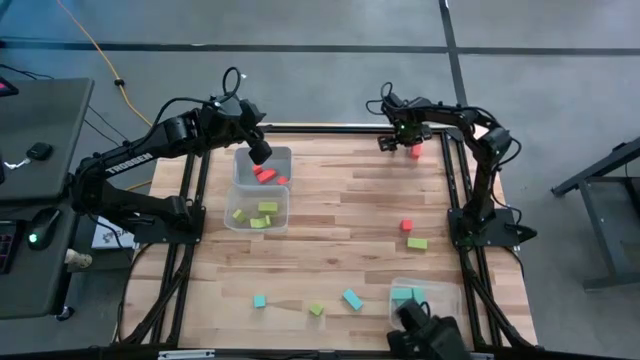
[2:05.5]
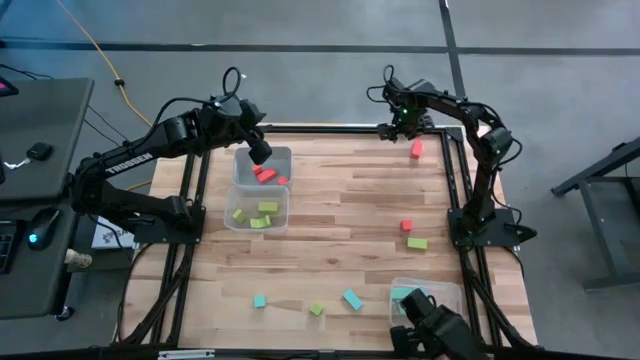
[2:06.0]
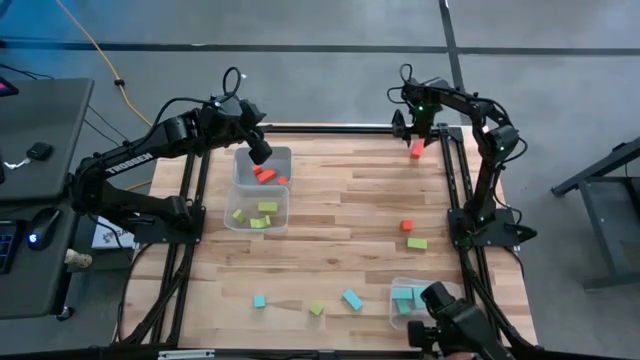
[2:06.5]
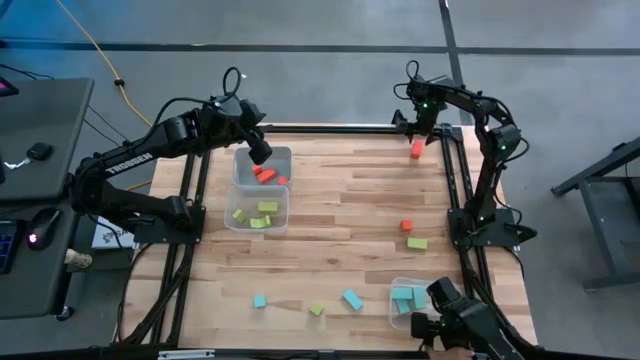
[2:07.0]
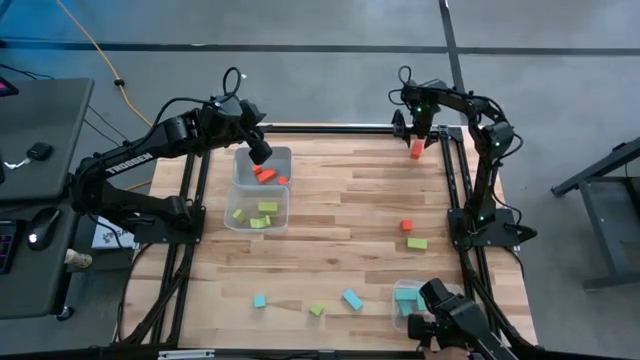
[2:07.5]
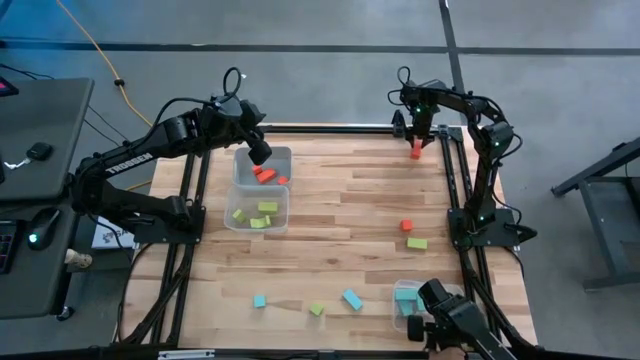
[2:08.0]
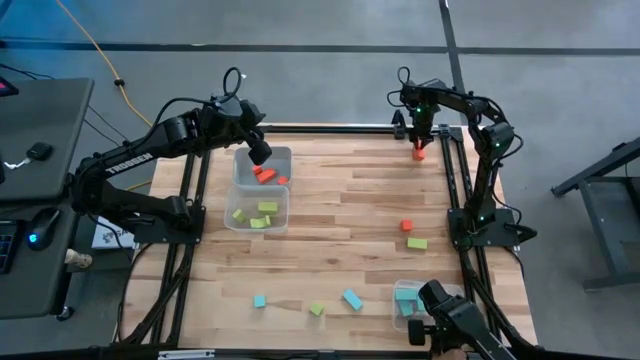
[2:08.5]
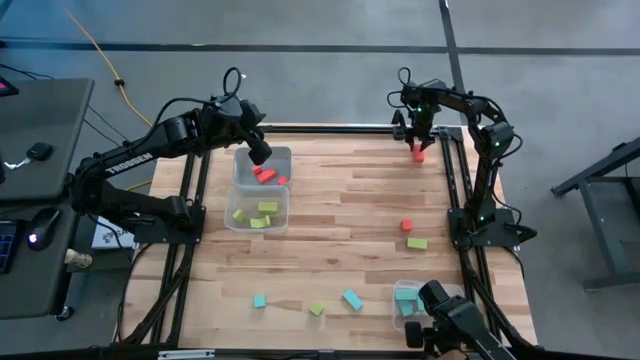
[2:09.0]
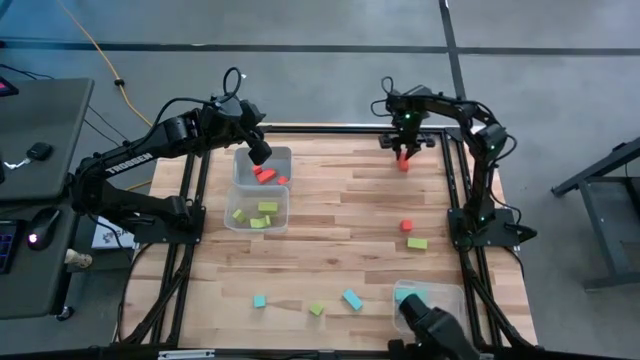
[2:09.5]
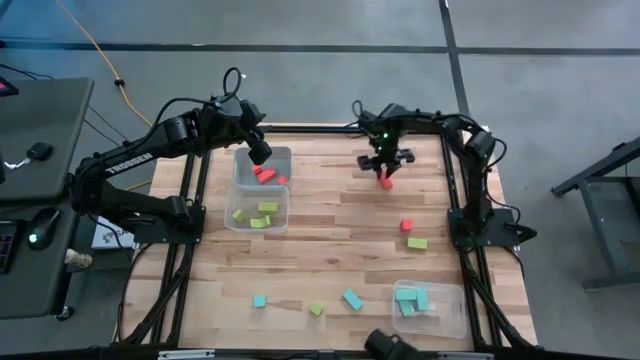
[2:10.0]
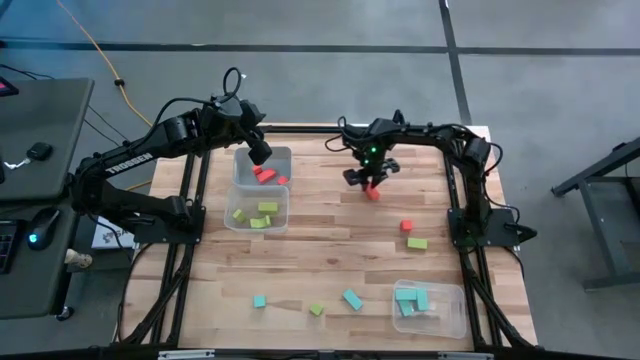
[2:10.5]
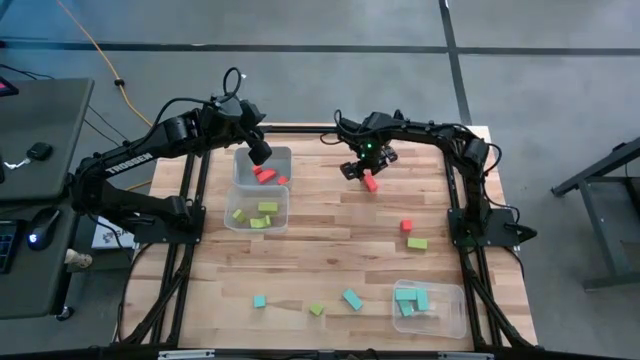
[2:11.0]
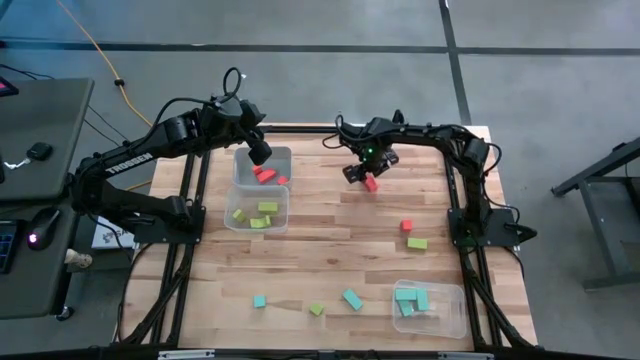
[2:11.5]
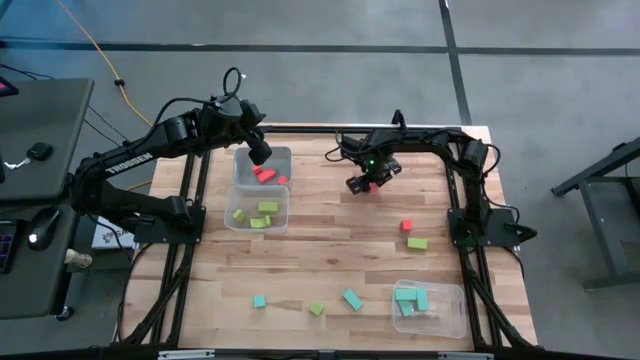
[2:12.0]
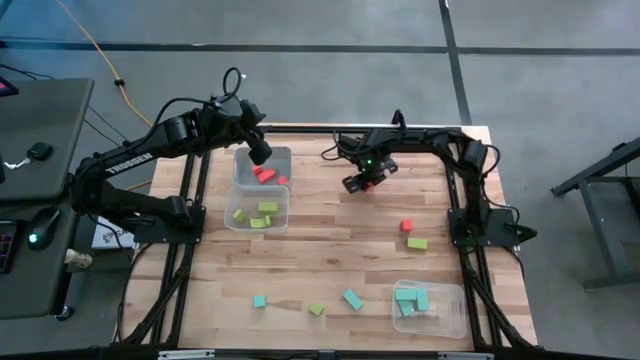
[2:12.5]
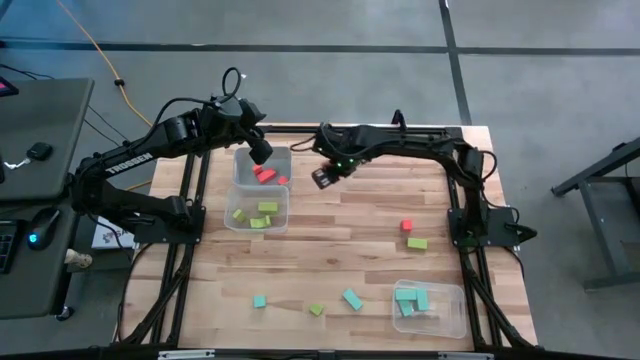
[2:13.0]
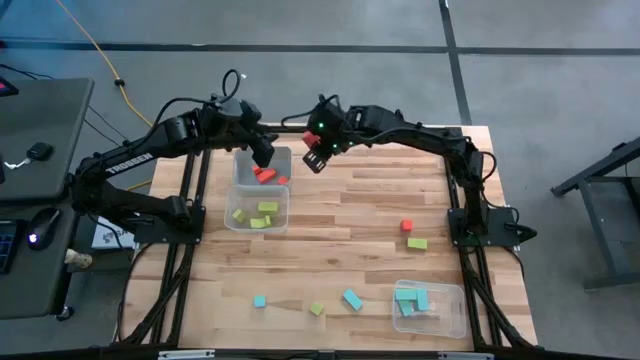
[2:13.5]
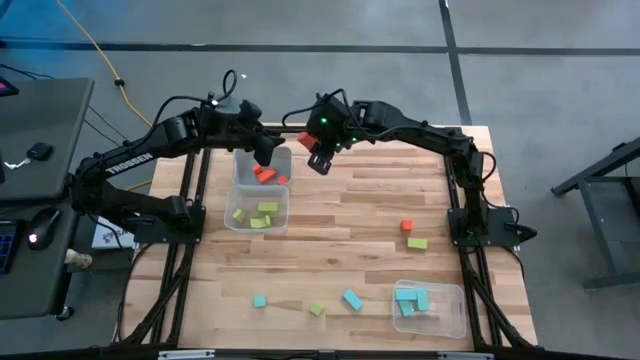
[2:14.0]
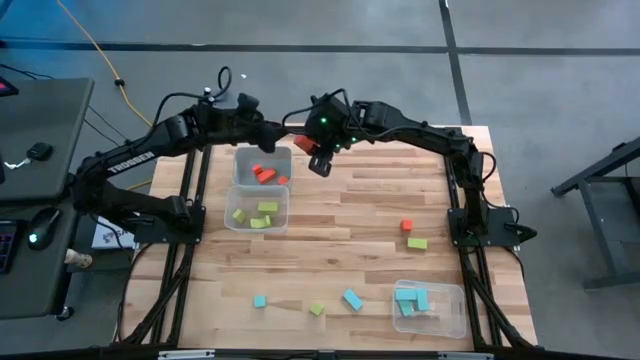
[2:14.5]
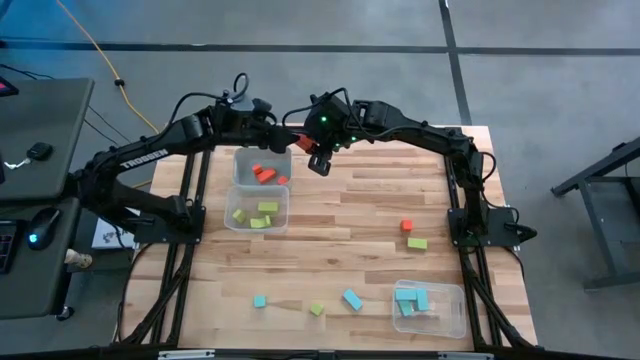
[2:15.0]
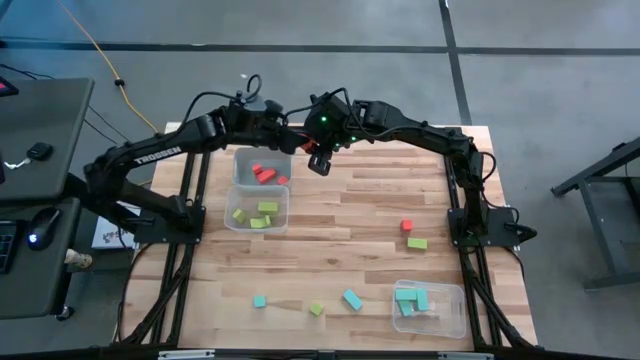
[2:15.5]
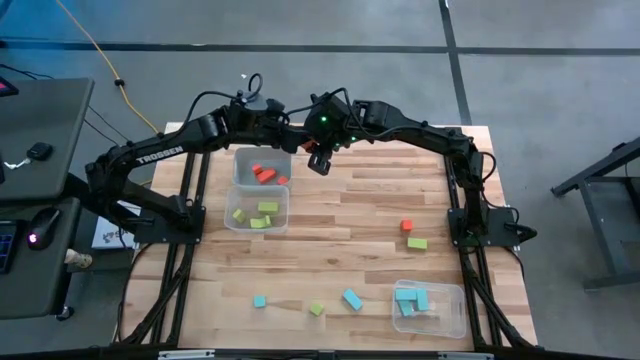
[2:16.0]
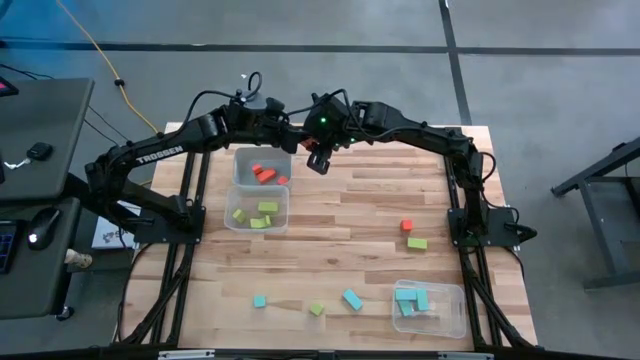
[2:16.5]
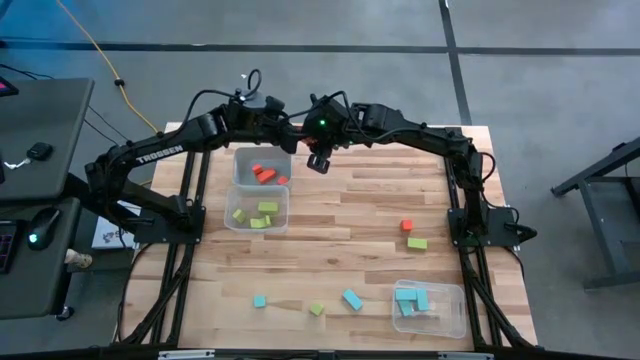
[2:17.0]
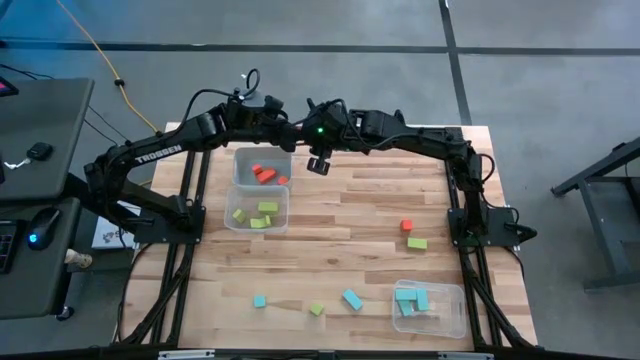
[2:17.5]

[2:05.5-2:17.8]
Task: Sort & place blocks by color
Put the orange block into the gray bin

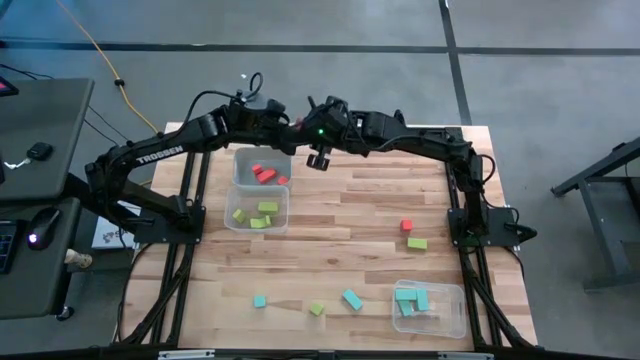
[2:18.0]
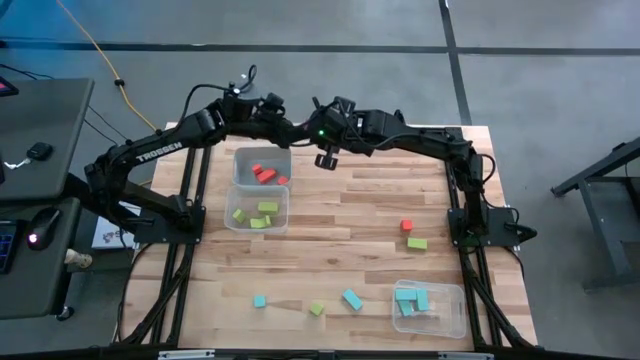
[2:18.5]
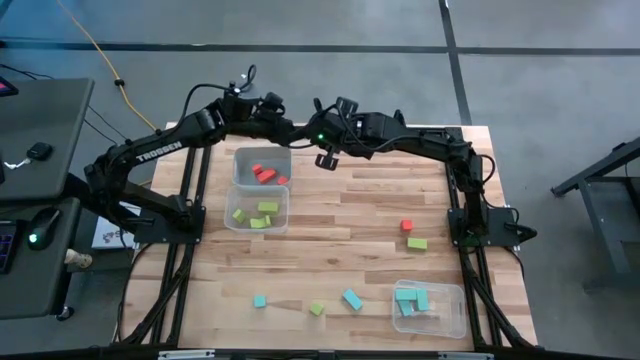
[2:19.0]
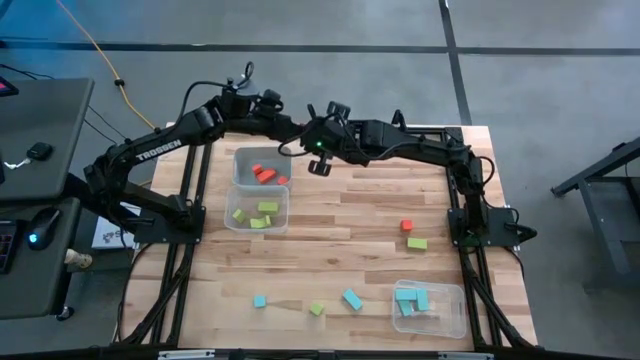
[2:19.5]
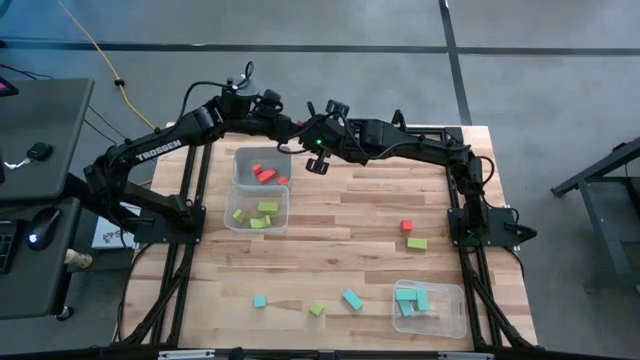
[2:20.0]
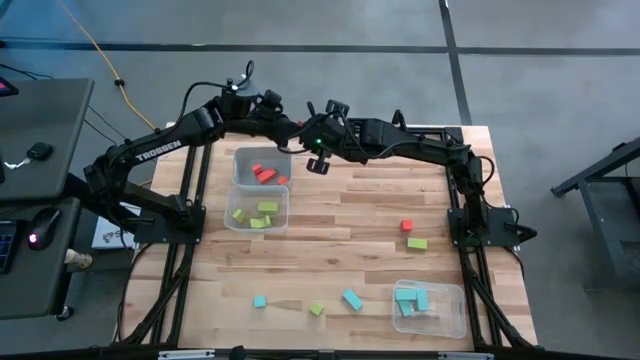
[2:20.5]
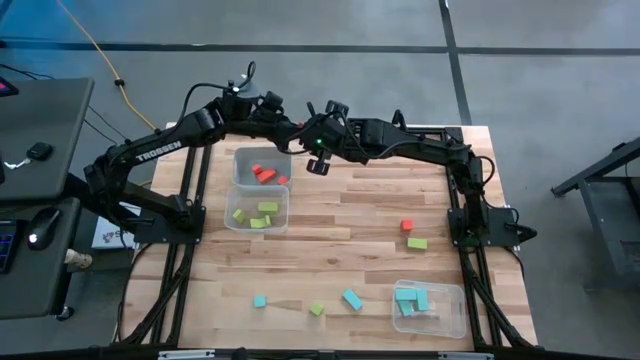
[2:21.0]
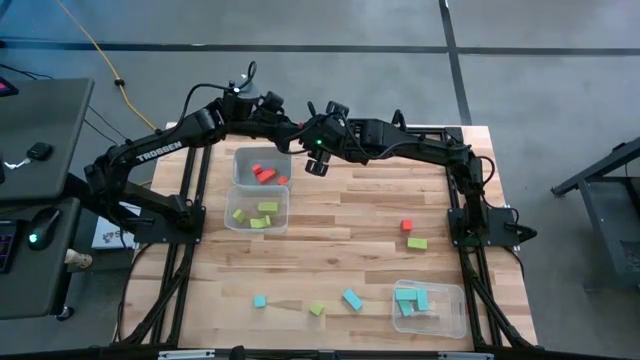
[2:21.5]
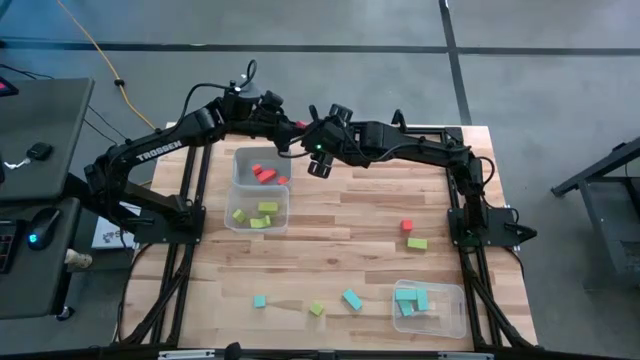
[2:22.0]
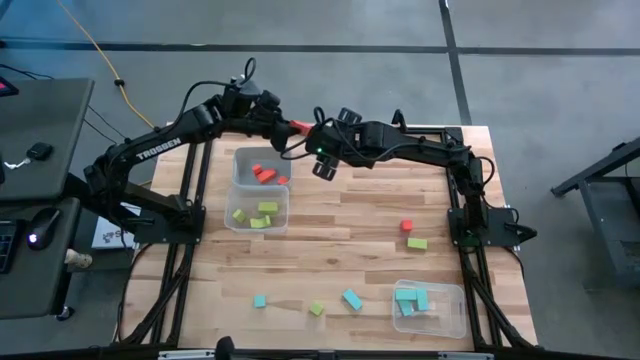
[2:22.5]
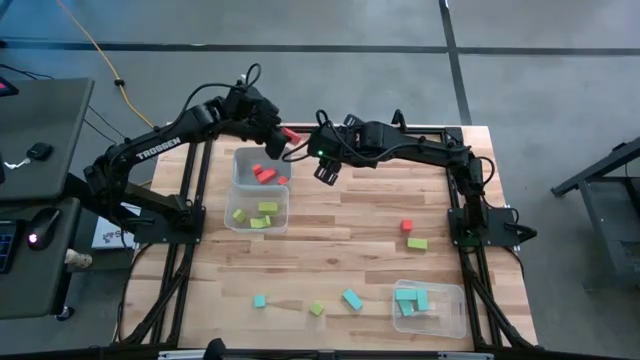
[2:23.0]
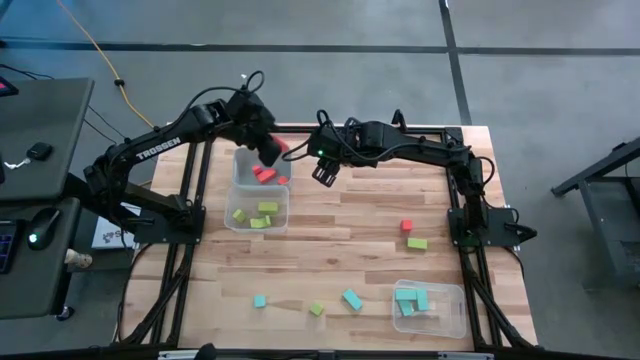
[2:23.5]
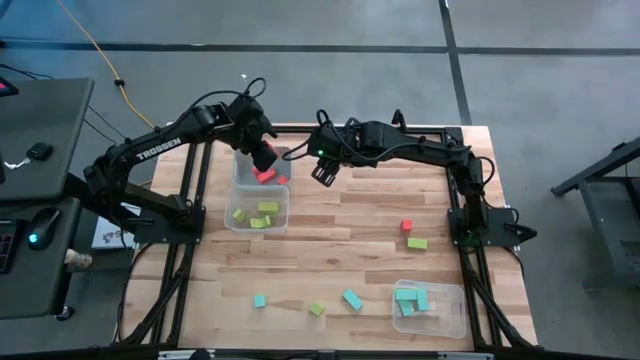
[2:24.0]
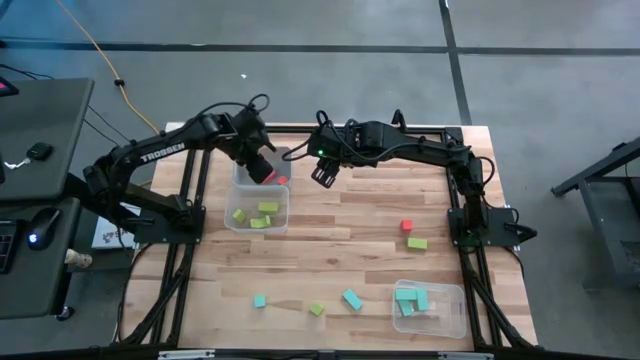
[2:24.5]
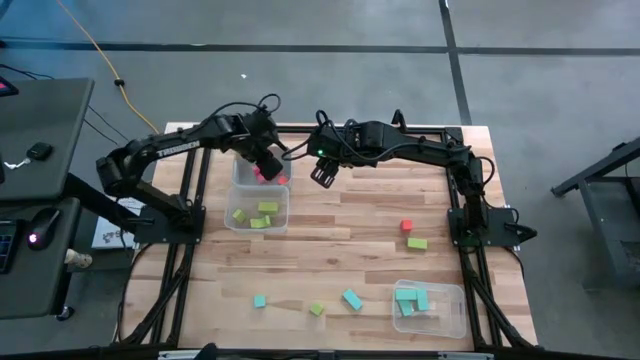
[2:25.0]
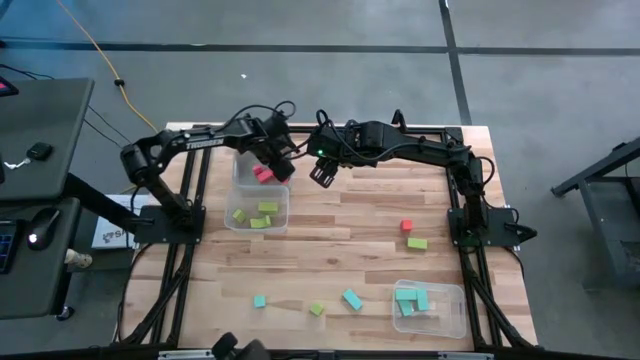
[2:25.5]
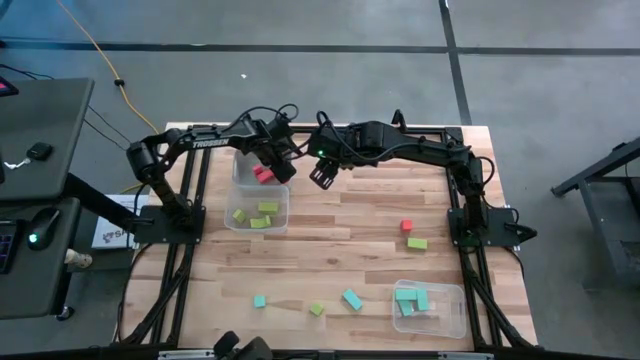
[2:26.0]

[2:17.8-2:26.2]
Put the orange block into the gray bin
